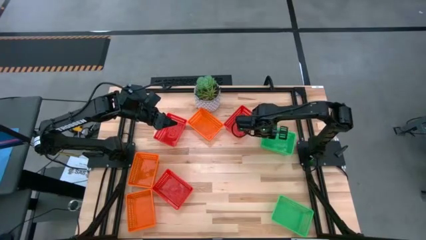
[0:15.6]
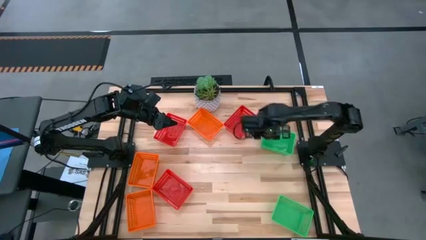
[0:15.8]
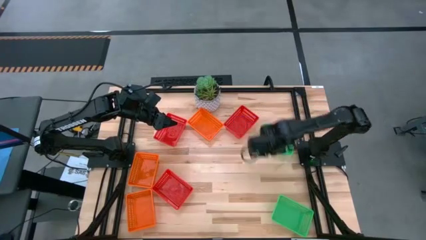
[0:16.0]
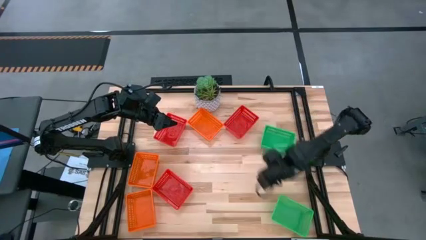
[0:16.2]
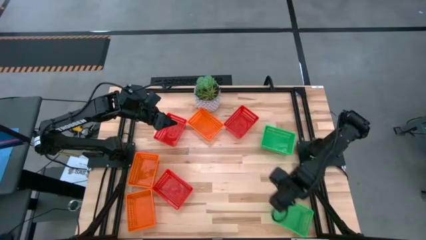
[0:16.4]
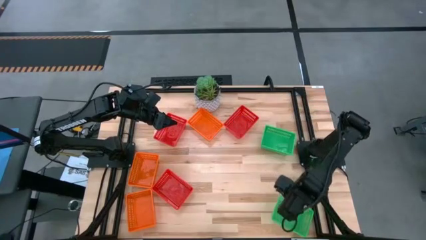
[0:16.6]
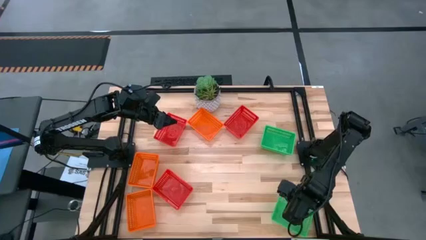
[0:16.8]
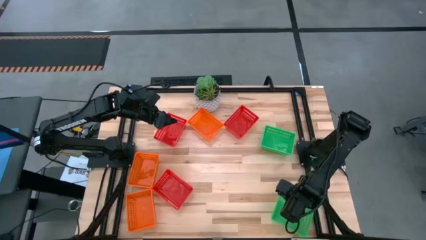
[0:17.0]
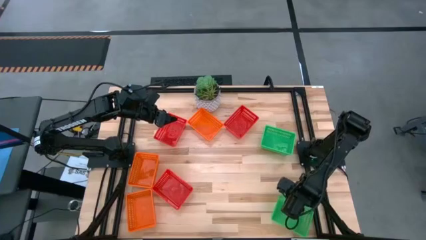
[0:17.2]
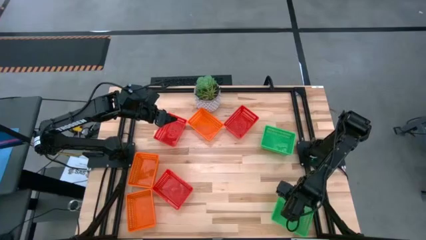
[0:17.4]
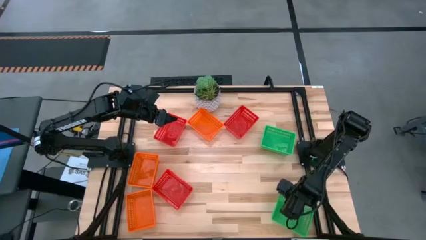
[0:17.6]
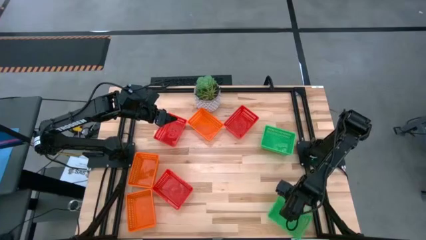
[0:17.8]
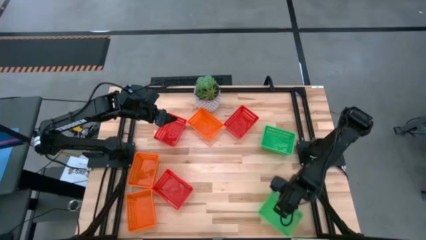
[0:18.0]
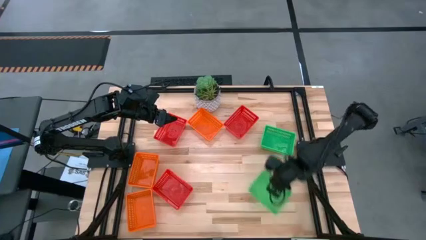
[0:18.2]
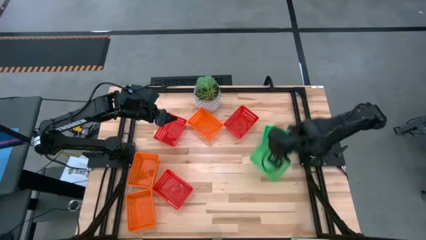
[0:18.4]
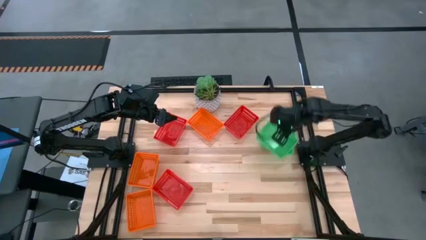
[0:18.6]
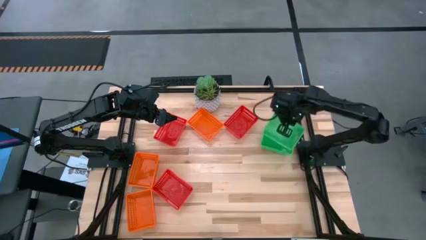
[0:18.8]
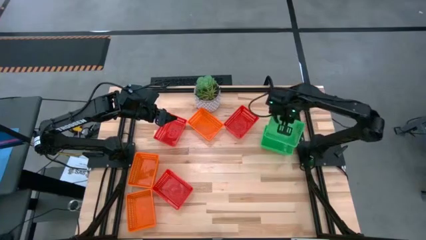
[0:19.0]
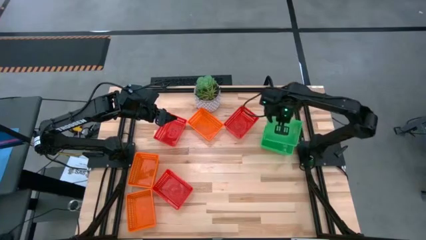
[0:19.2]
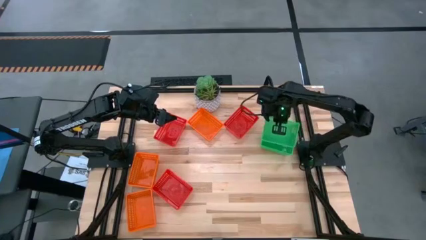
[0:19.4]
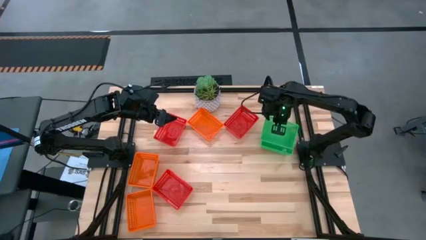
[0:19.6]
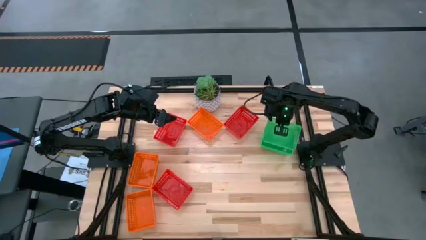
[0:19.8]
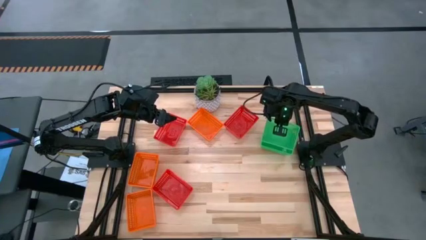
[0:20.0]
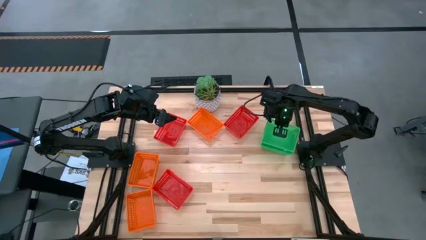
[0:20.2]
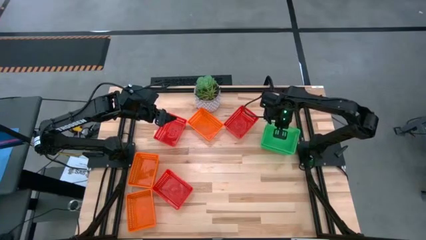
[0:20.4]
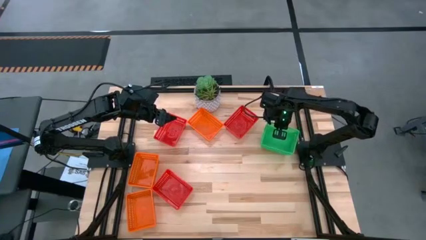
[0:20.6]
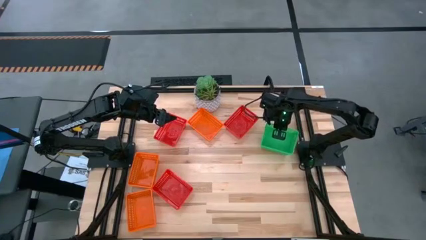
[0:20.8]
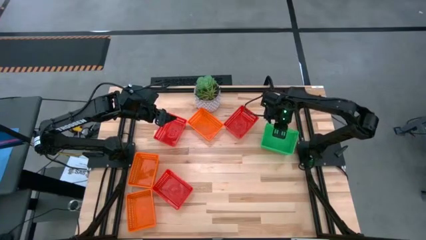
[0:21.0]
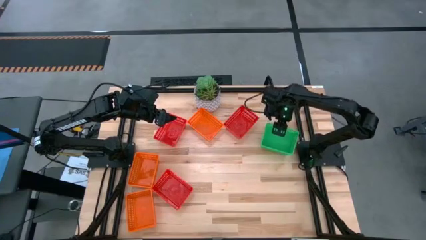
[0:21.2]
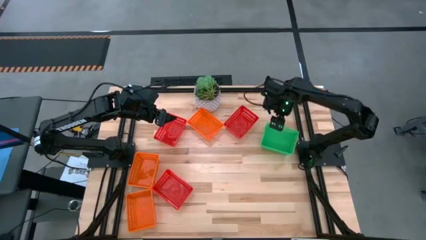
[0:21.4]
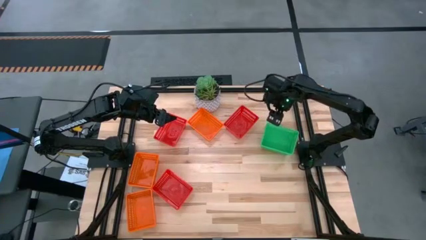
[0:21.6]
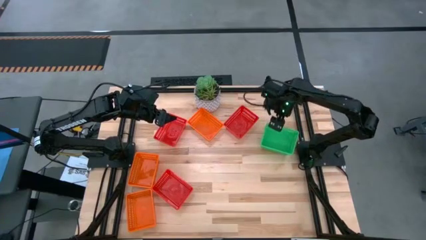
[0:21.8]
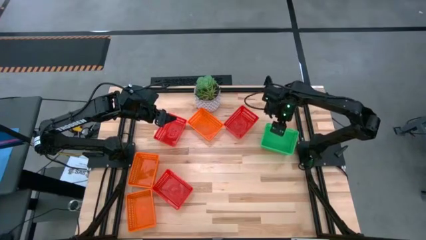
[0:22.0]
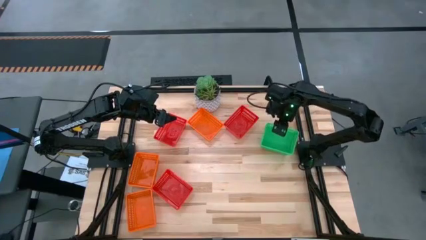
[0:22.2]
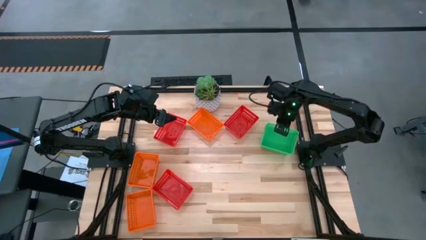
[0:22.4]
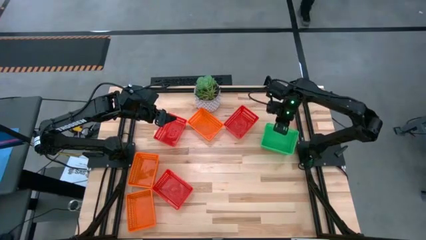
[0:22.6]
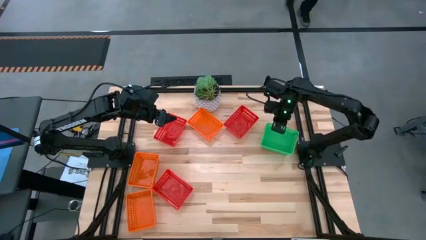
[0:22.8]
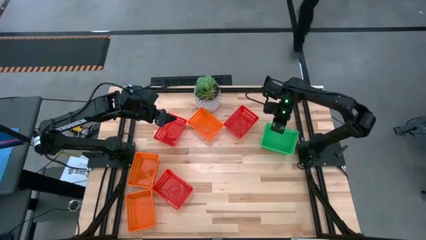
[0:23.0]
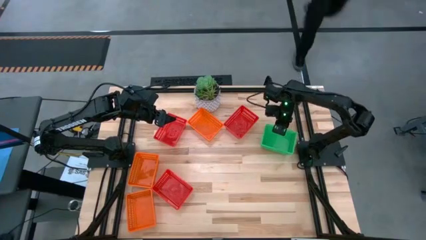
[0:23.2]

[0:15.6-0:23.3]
Stack the bottom green bin into the stacked green bin

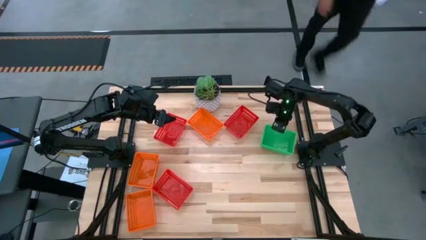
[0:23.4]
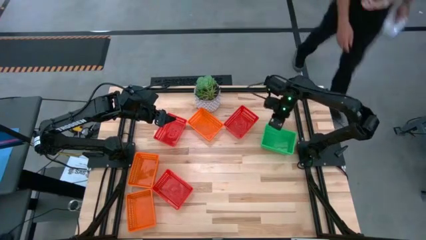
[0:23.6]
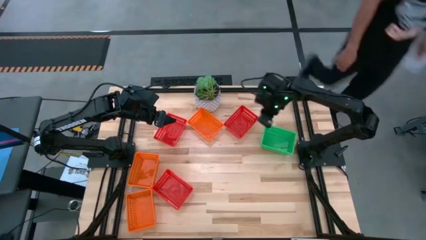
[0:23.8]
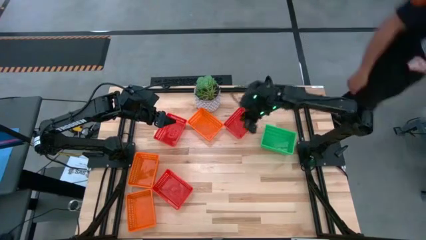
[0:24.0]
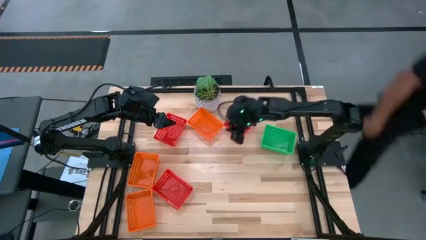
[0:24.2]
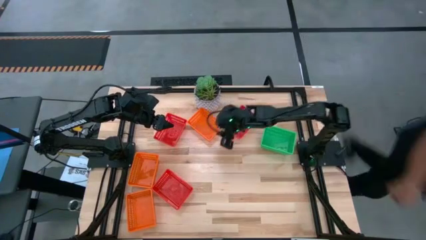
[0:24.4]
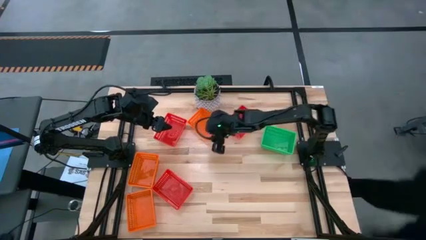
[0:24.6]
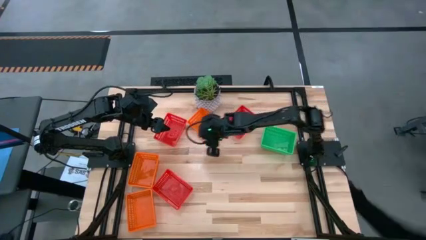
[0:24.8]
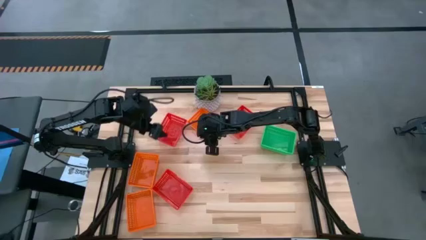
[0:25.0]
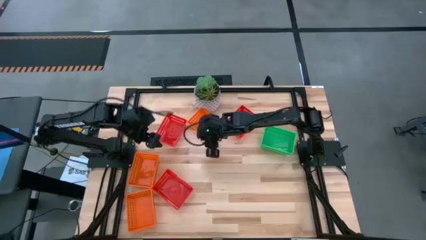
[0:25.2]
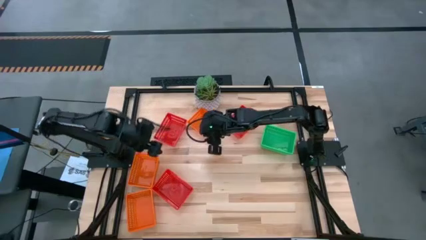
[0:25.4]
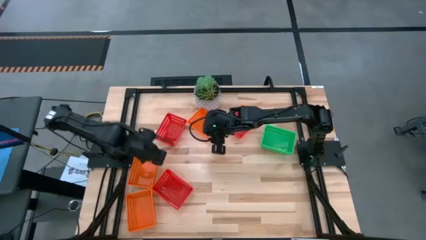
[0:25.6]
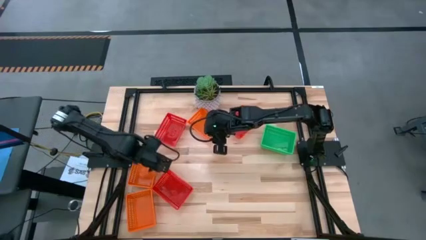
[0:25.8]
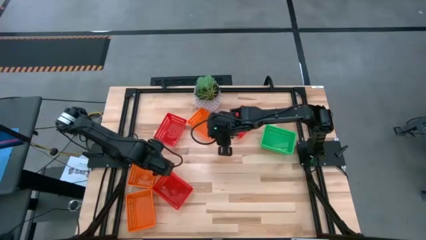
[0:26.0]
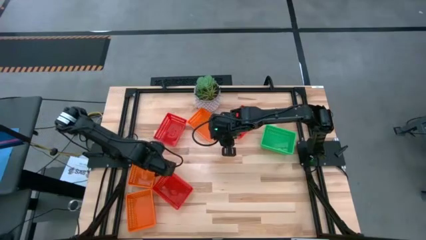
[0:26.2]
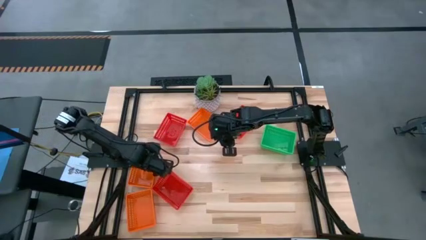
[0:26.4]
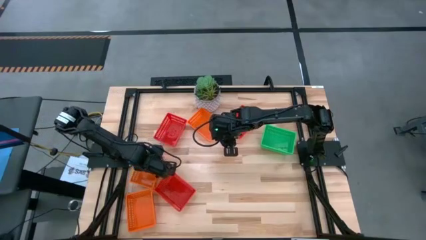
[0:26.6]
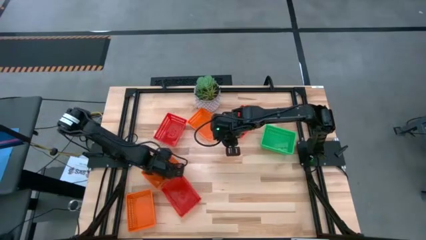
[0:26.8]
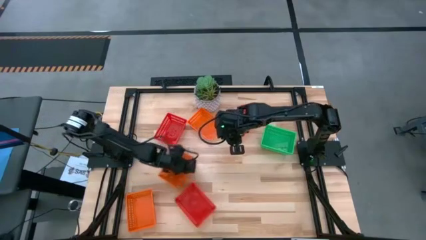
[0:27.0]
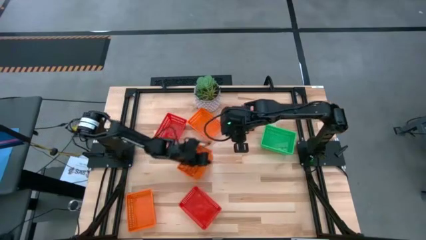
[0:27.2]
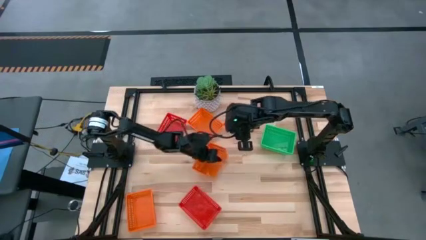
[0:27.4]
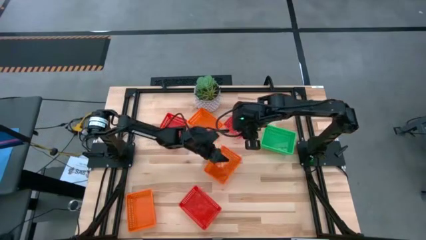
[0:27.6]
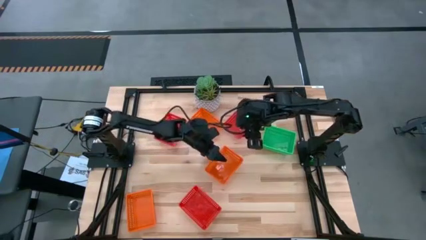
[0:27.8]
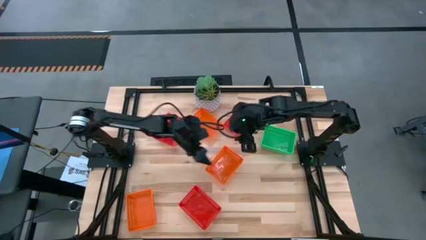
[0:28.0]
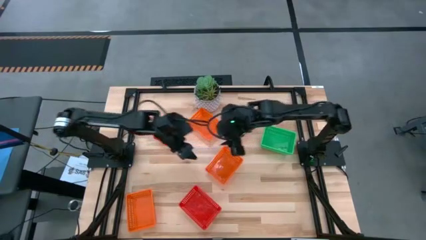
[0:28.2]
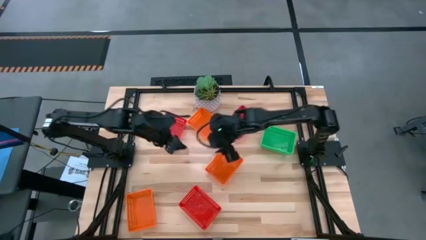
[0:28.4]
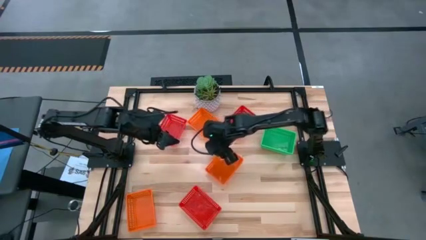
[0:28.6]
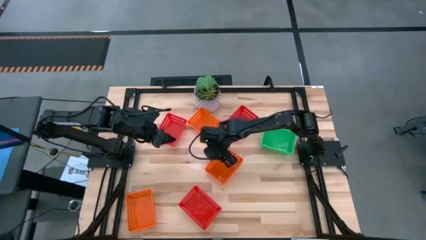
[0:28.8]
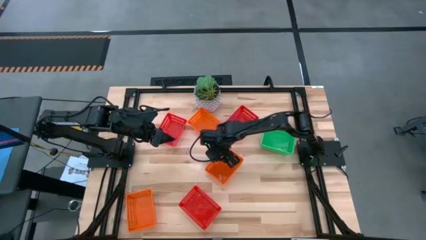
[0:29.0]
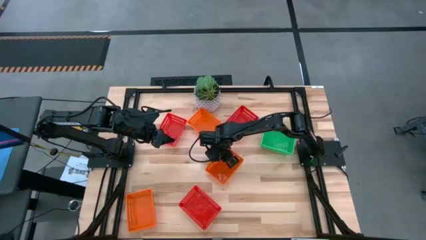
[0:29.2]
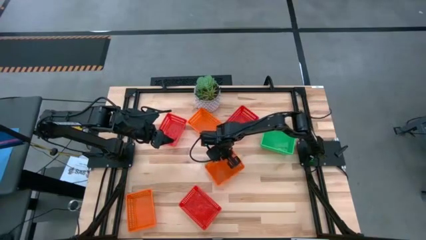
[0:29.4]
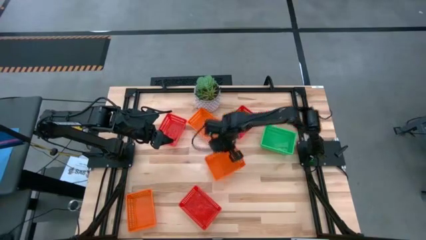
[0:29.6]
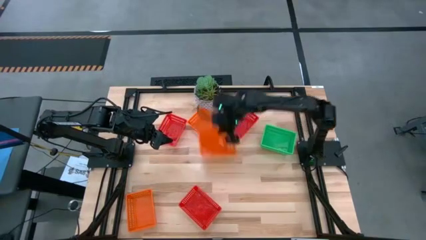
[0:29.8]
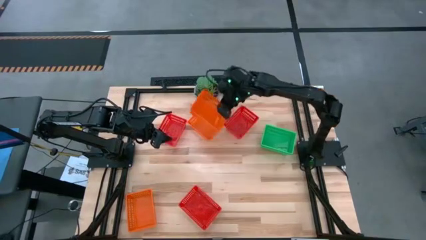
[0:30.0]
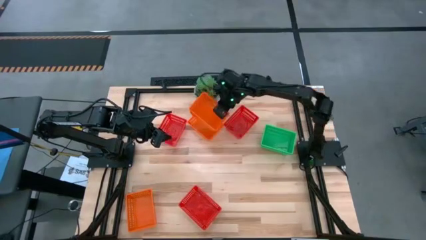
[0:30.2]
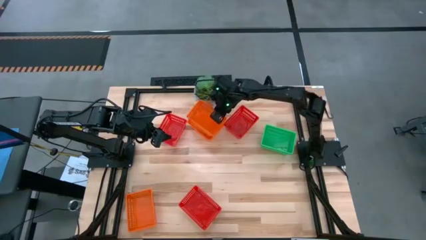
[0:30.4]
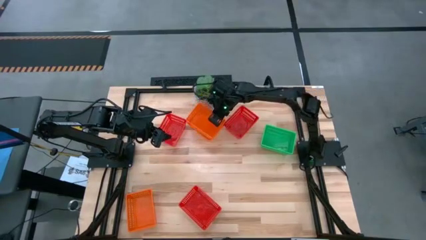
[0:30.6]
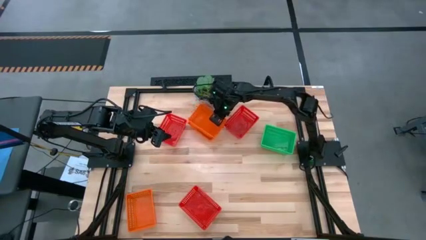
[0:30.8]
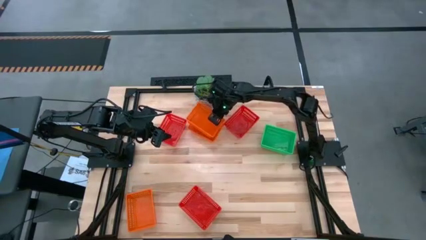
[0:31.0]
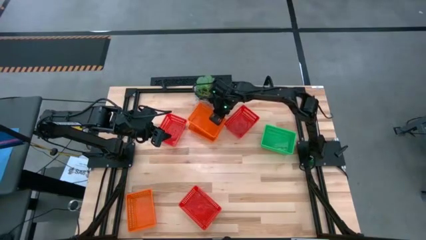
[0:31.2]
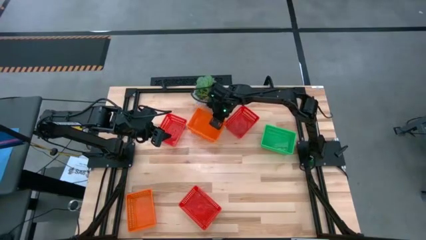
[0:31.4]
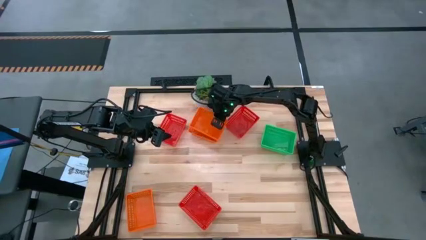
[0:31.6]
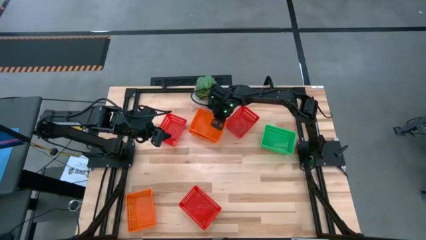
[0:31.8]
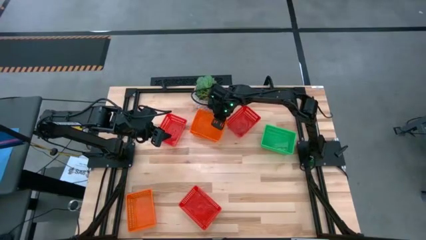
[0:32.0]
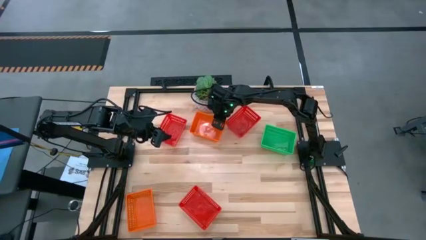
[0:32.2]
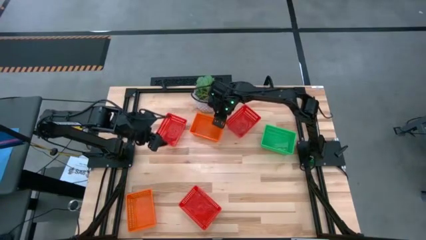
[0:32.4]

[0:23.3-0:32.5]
Stack the left orange bin into the top orange bin
